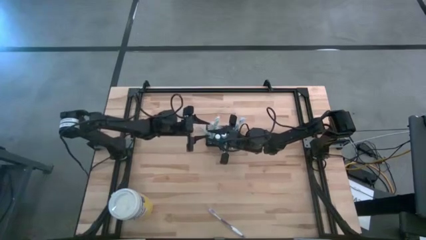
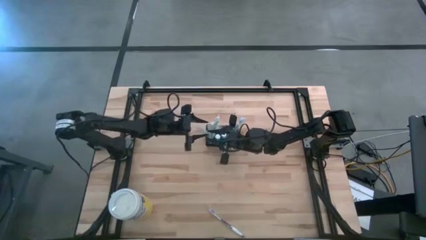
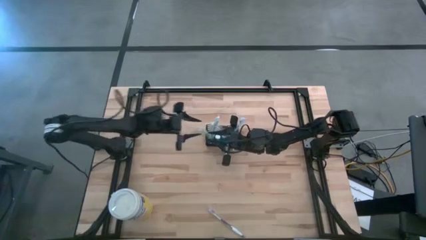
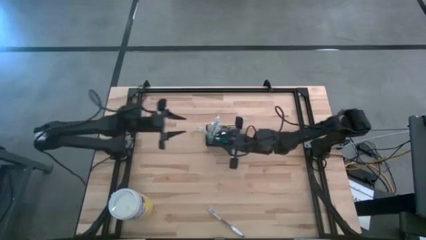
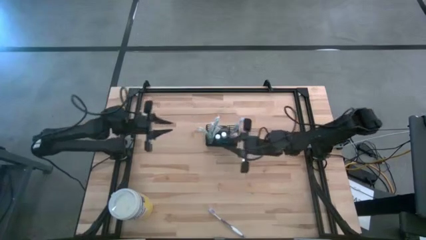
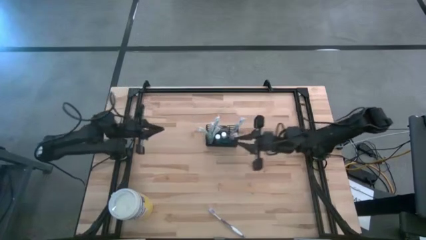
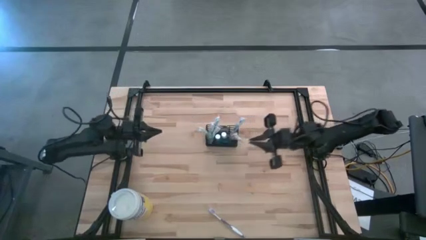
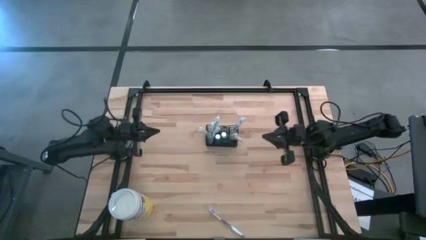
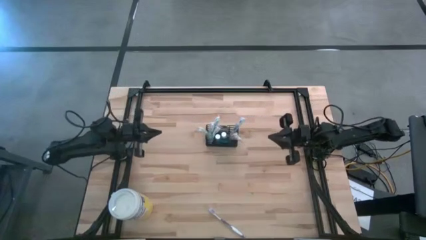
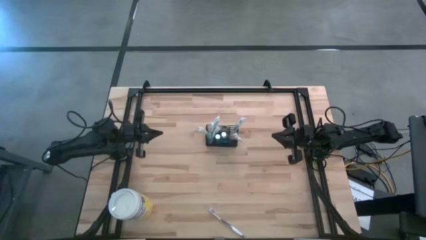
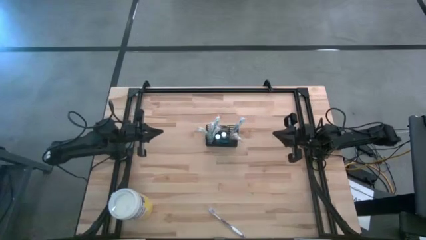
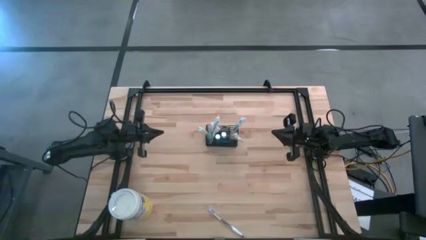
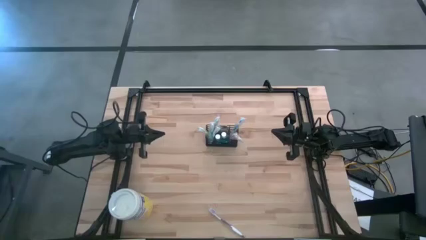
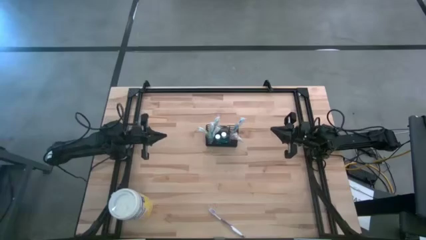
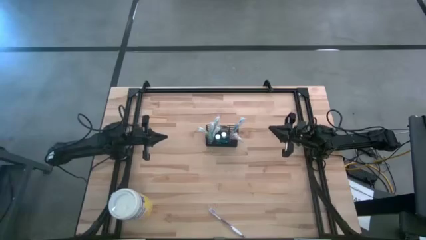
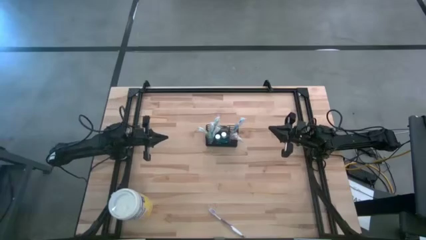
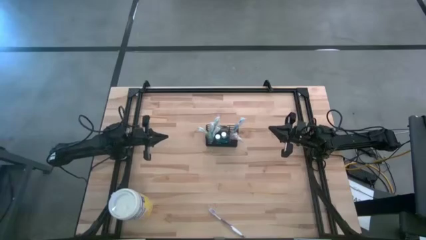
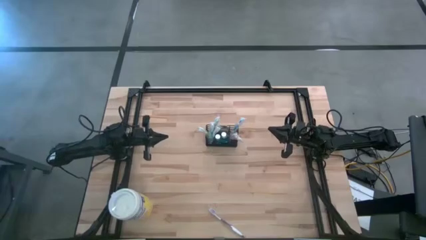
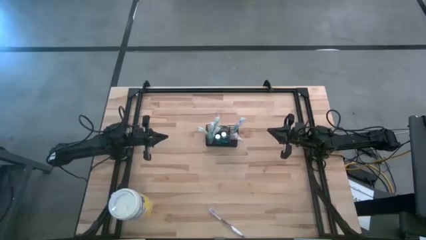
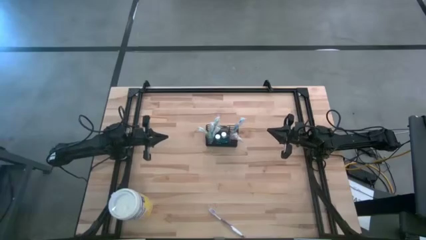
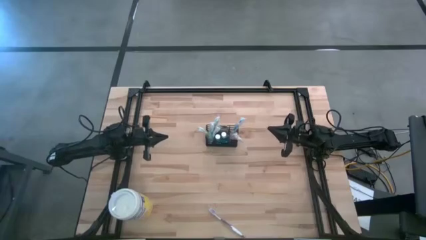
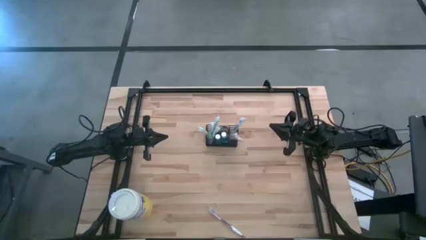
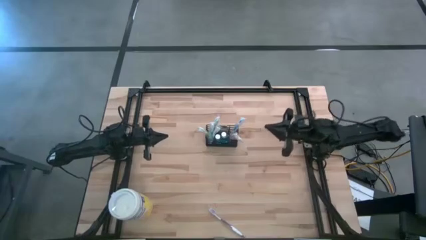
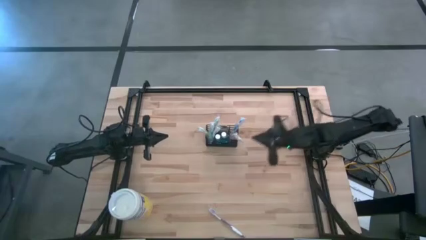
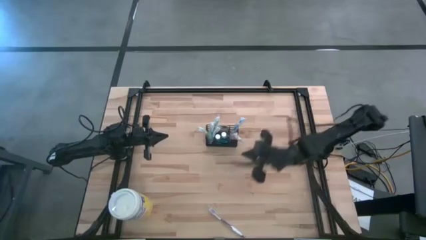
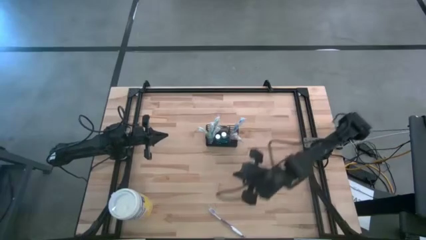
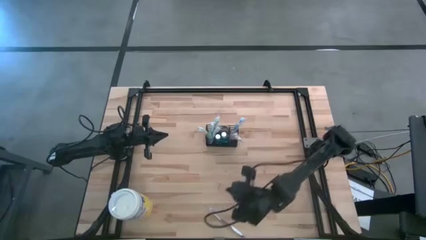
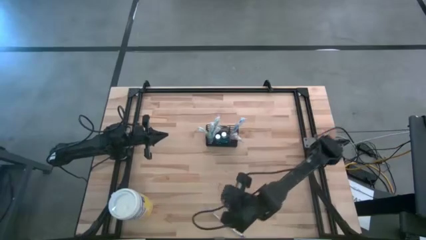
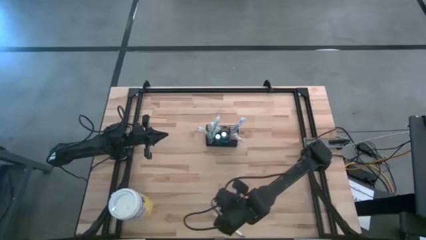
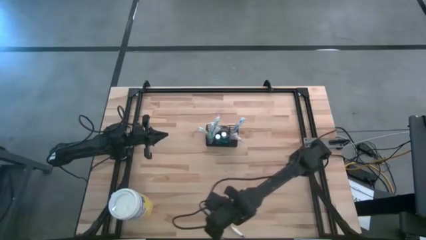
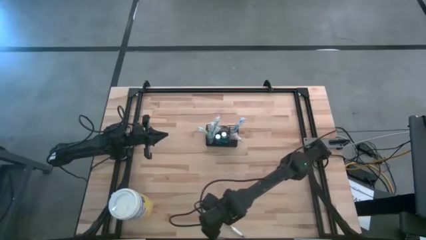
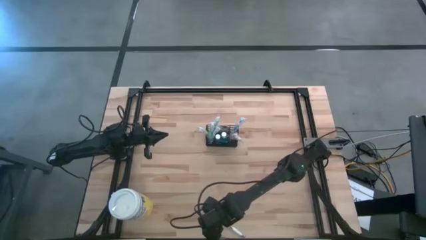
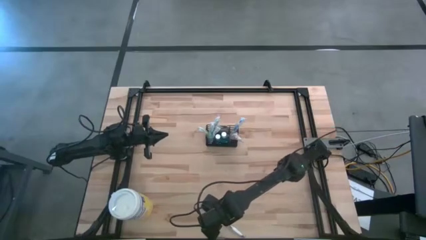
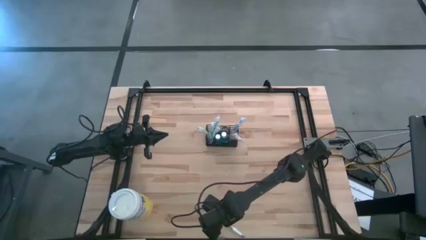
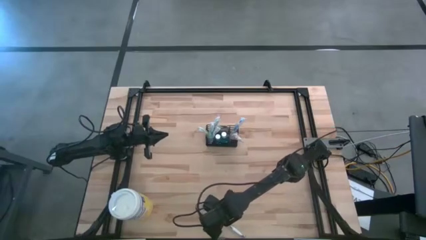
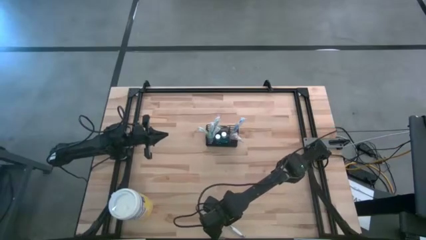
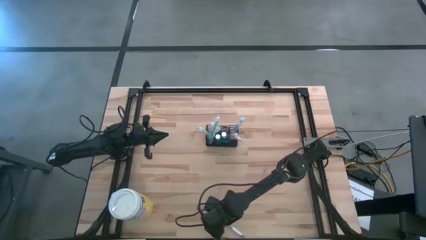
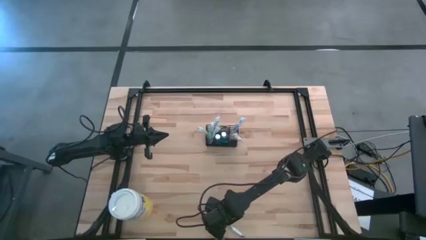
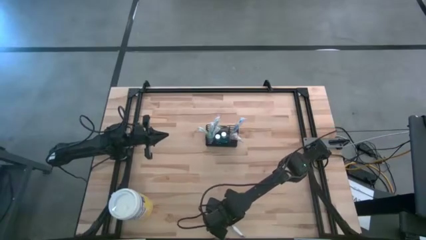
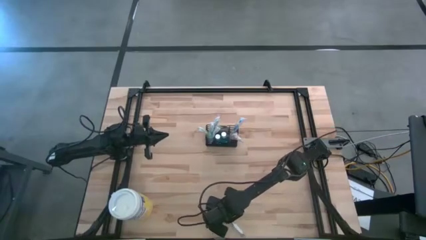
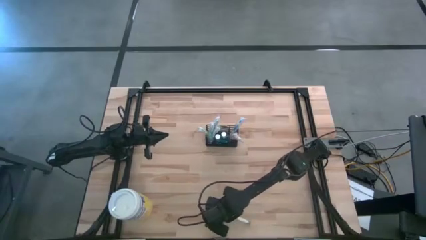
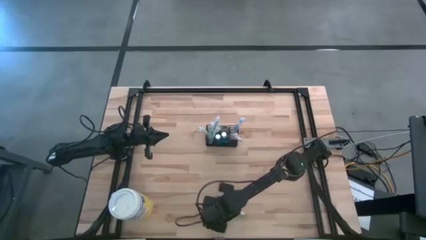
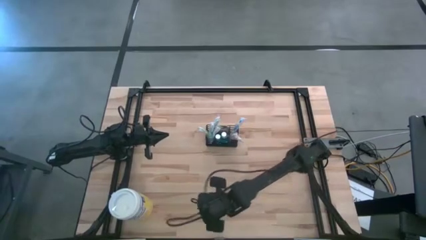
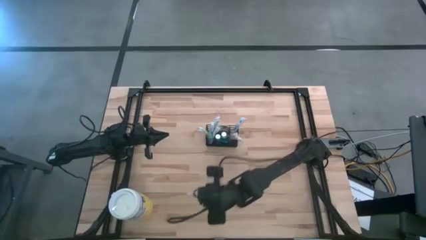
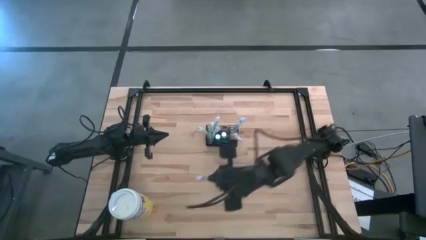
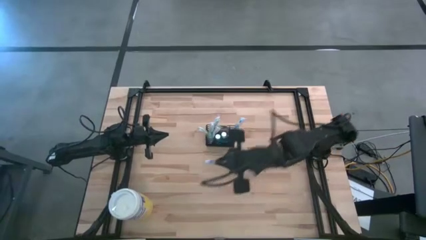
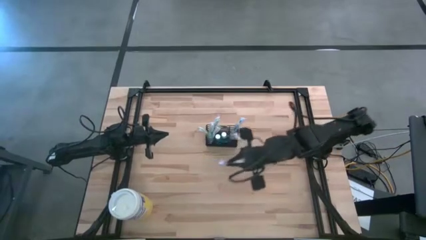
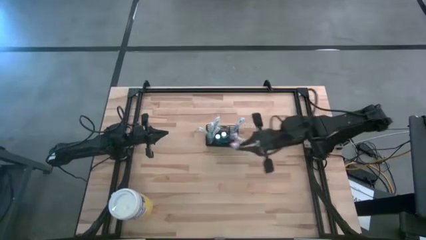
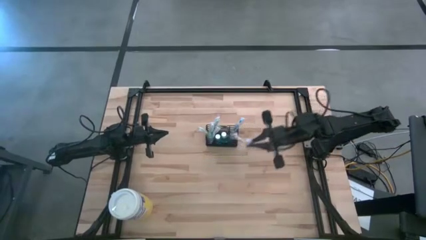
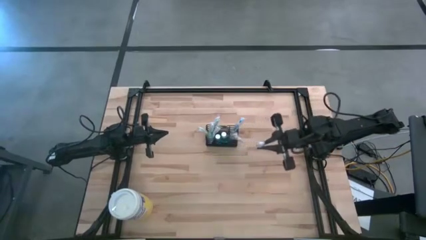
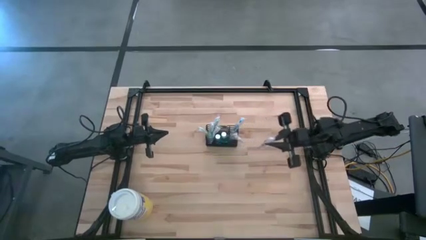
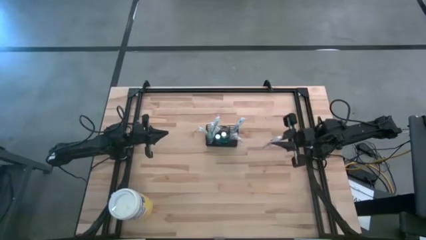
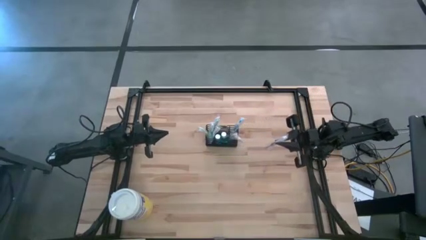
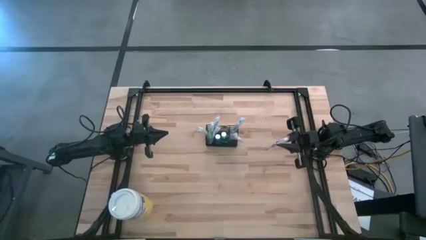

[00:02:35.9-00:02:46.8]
Task: Pick & Place toothbrushing station
Put the purple toothbrush into the wire organizer

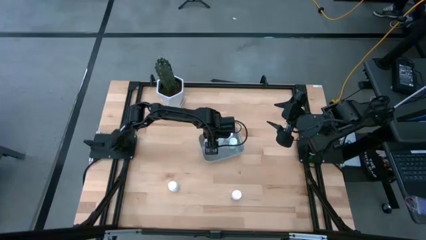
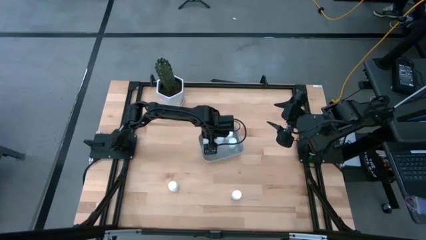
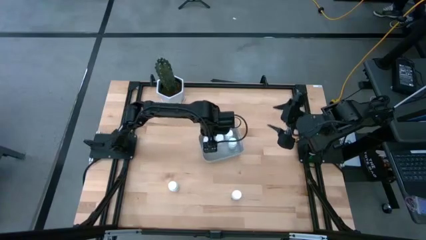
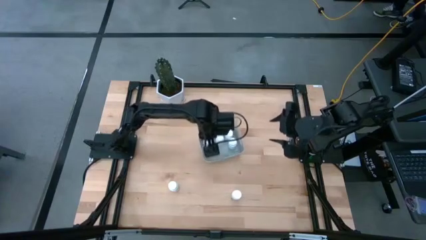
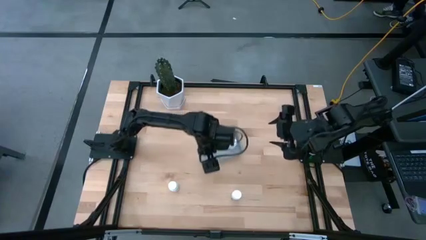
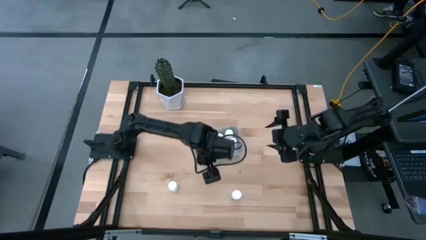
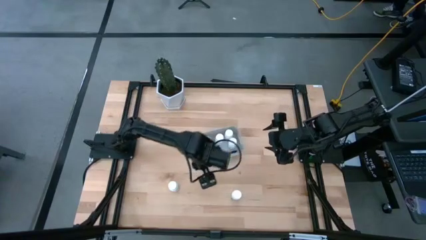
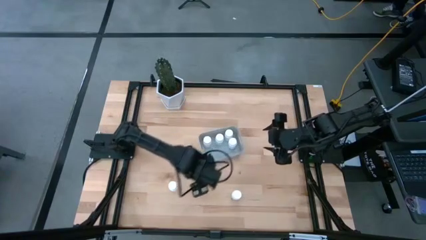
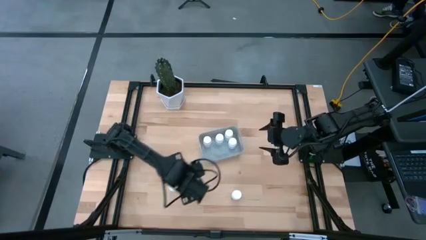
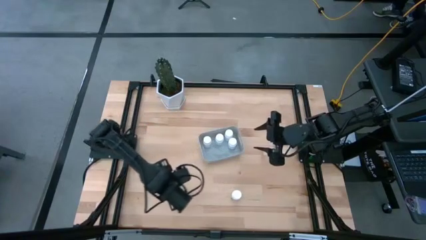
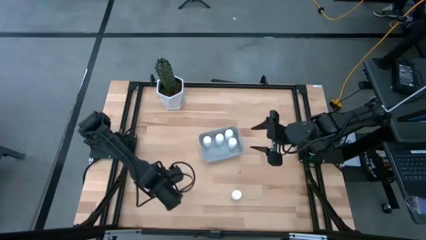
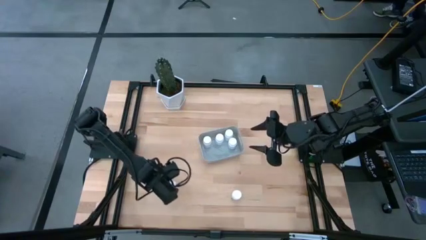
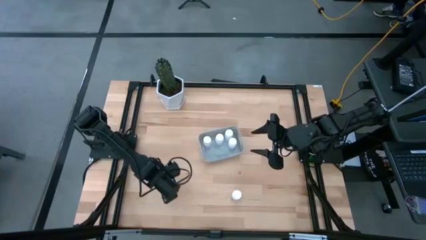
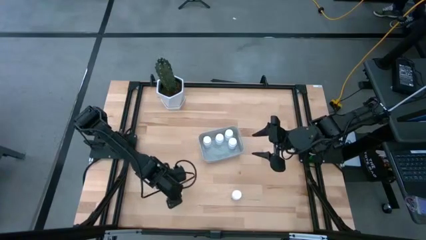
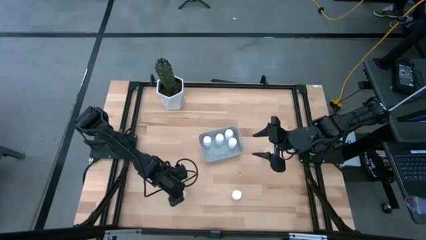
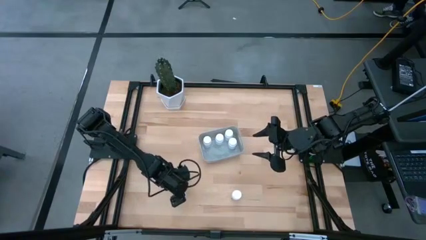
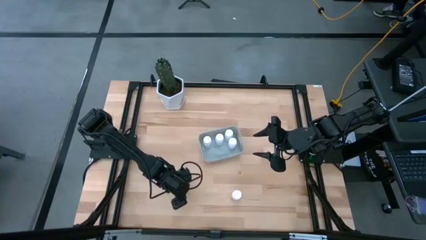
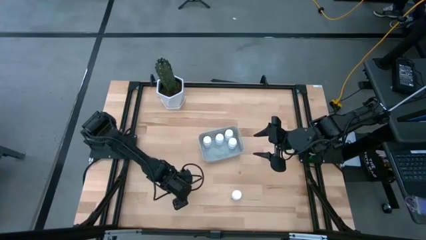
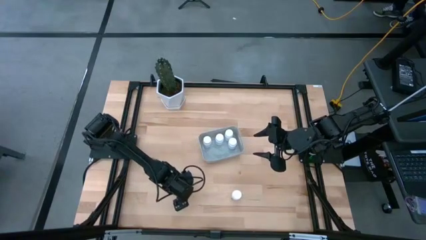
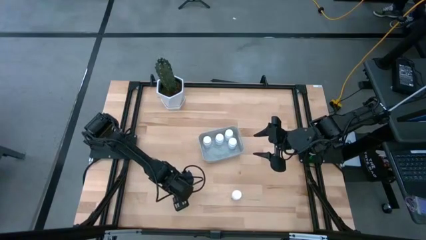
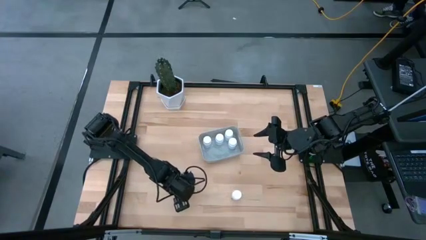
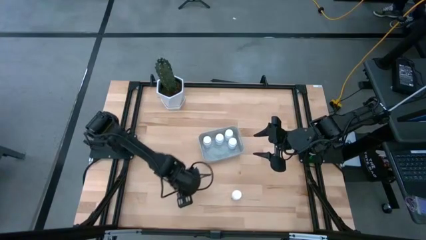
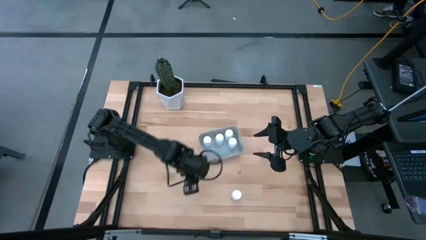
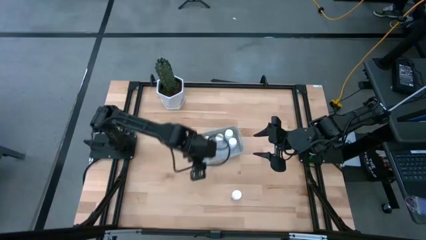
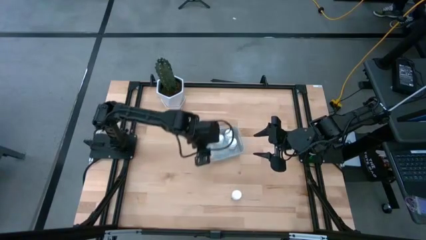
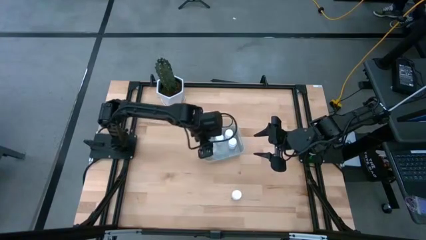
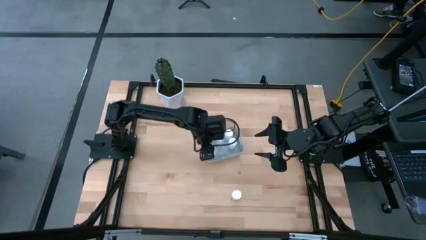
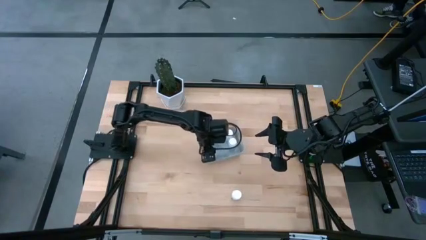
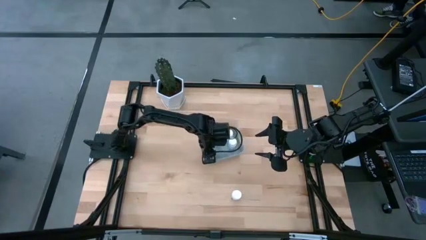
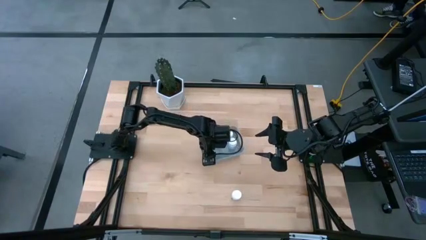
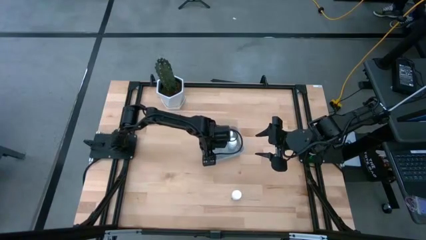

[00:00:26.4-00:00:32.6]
Task: Pick and place pill bottles into a basket
Put the white pill bottle into the gray bin
